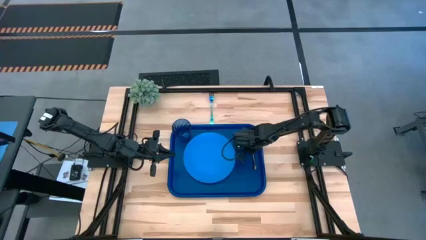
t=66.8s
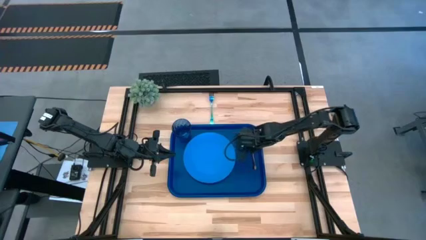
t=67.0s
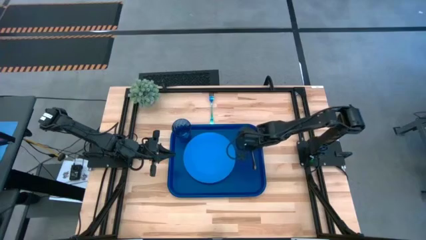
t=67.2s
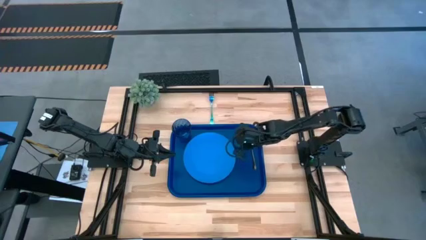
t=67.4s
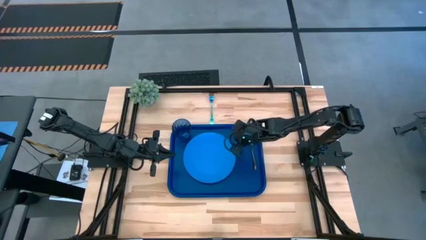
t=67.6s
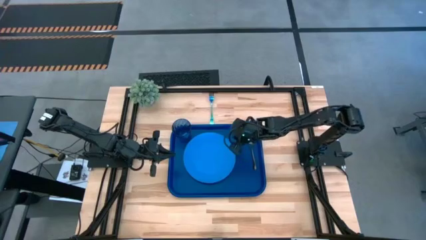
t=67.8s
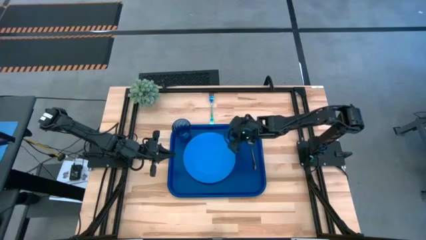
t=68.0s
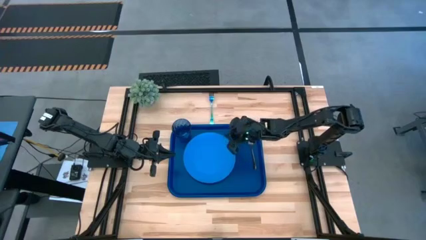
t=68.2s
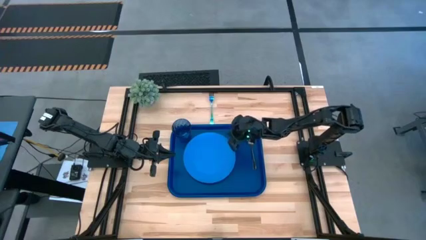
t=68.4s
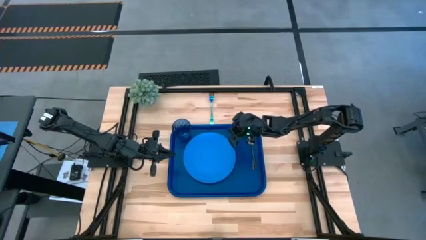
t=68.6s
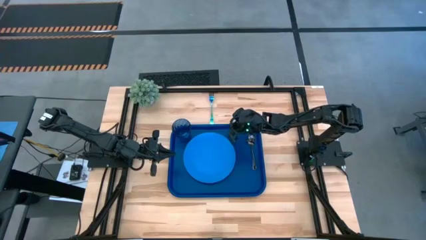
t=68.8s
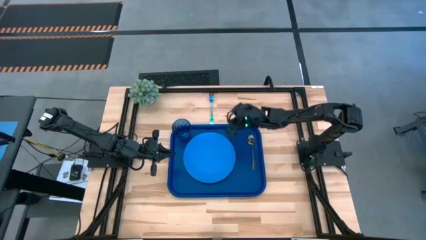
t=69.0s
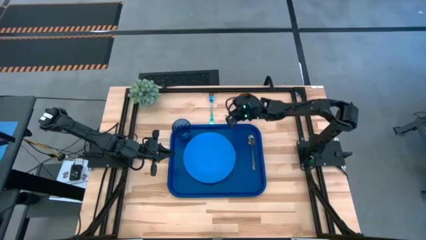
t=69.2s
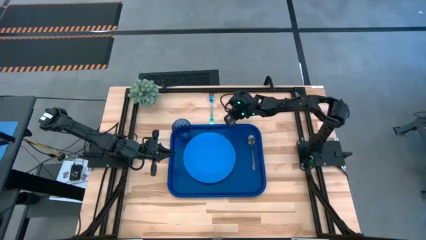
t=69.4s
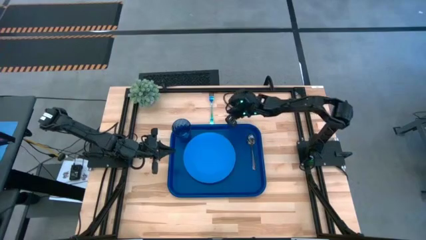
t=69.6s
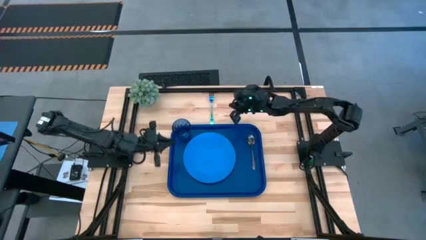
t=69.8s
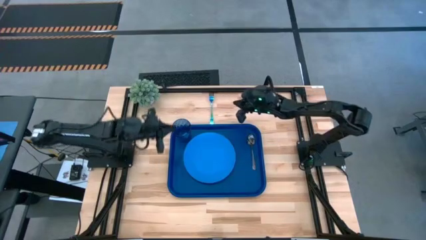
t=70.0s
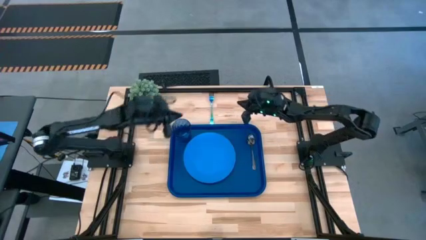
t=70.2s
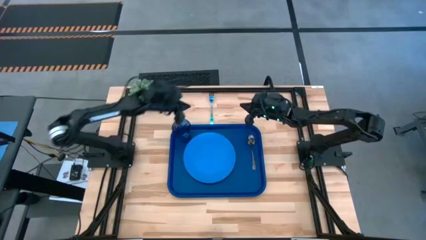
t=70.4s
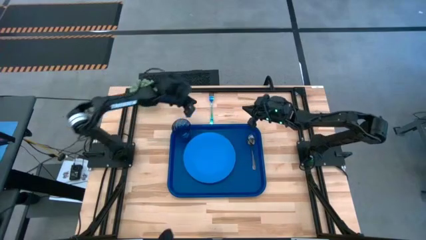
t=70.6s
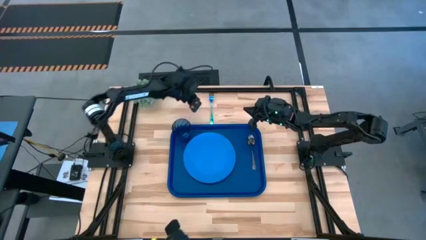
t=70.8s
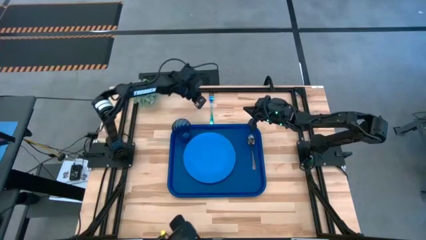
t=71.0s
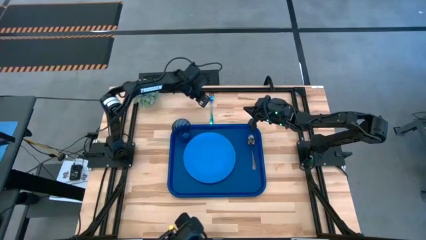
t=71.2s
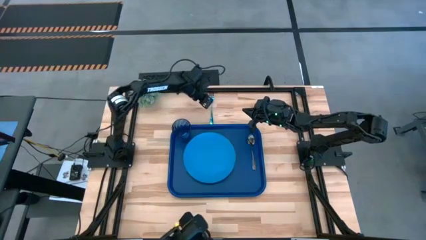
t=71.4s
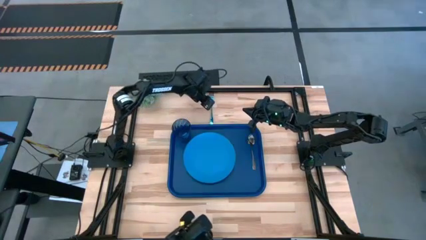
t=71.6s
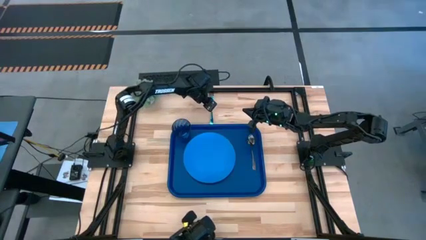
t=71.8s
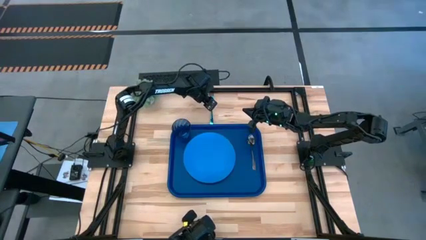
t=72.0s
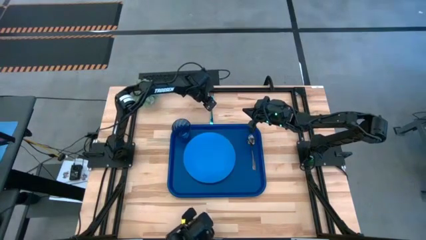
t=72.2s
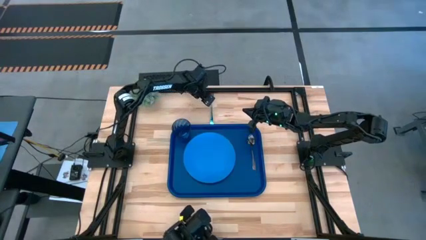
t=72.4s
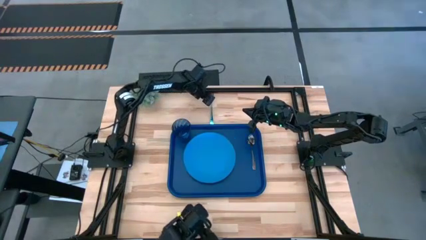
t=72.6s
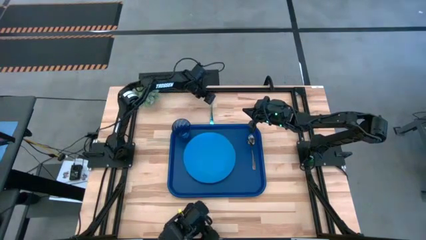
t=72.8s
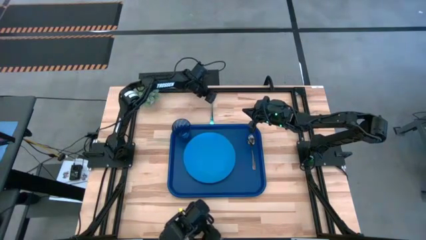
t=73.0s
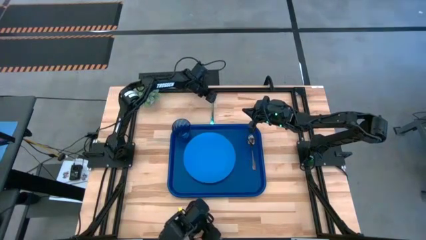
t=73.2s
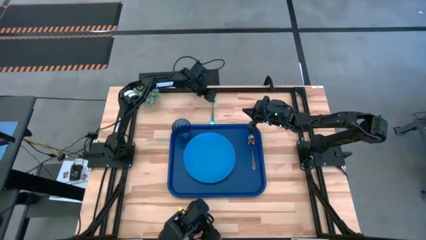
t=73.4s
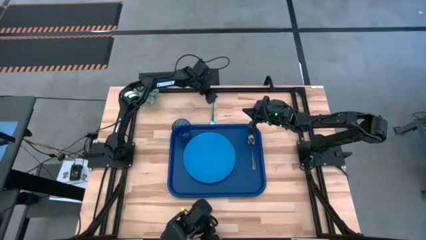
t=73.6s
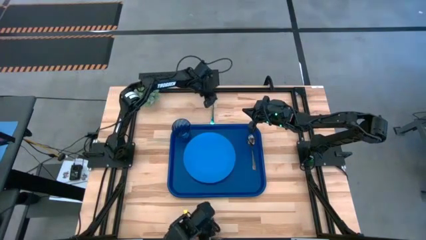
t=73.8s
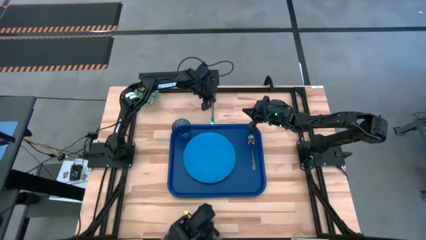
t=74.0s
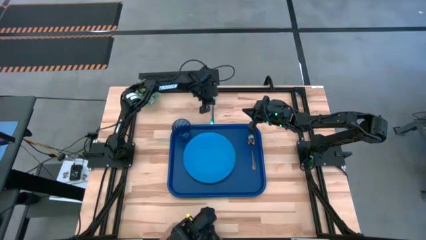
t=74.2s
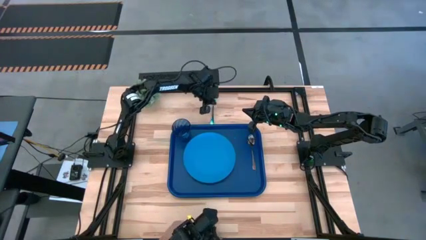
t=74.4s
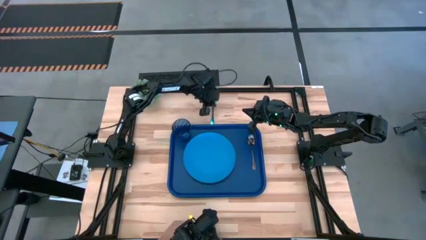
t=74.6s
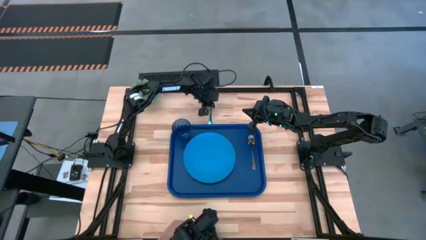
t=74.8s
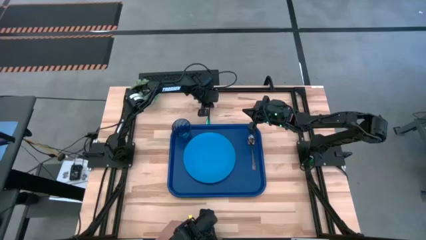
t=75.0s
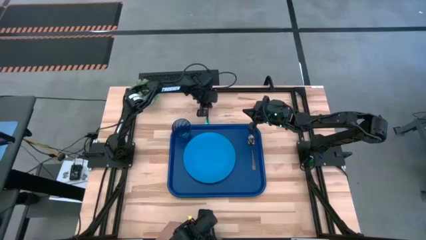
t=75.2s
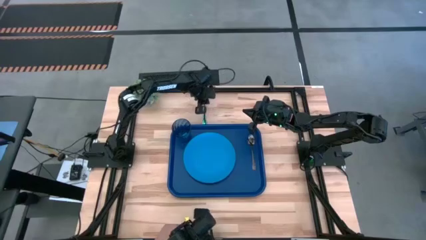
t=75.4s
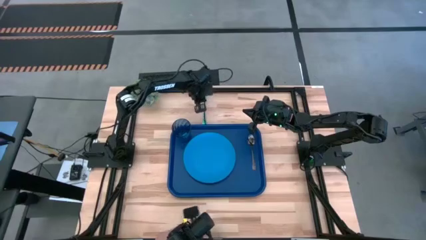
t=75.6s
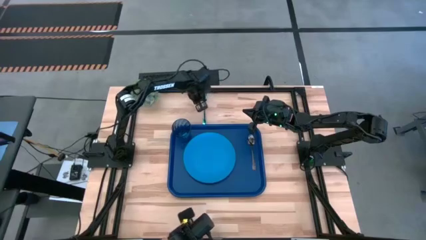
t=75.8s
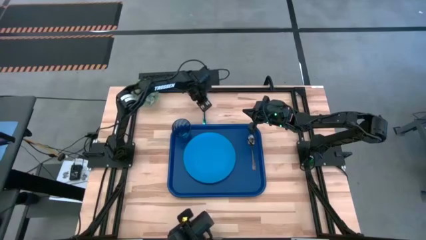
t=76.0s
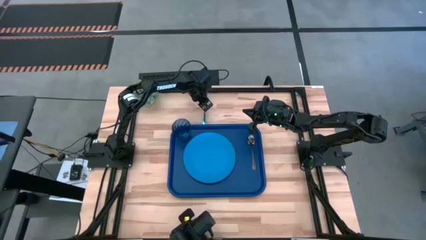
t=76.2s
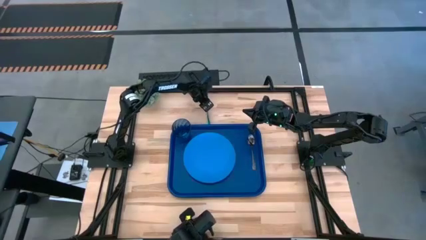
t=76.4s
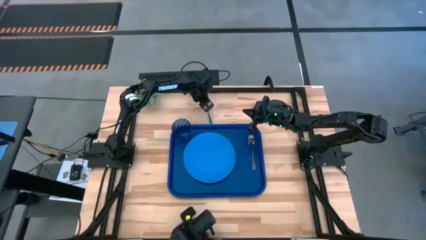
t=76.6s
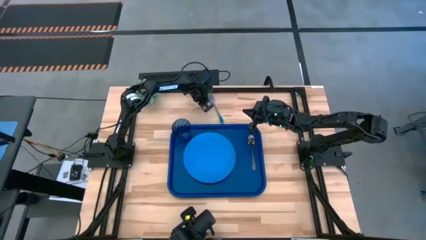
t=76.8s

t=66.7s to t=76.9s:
Task: Pick and place plate/cup/fork/spoon on tray
Put the blue fork on the blue tray to the right of the blue plate

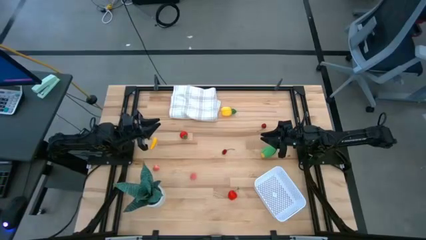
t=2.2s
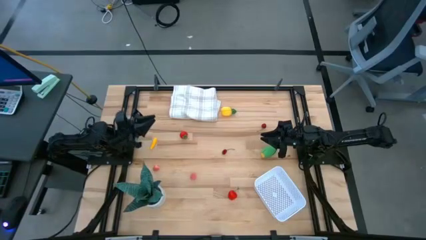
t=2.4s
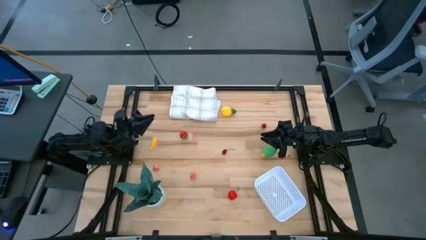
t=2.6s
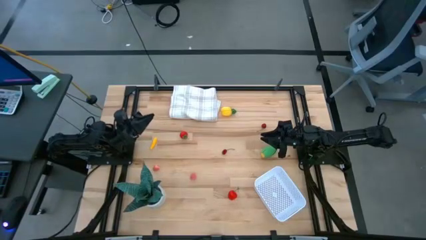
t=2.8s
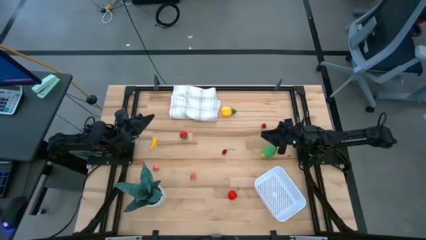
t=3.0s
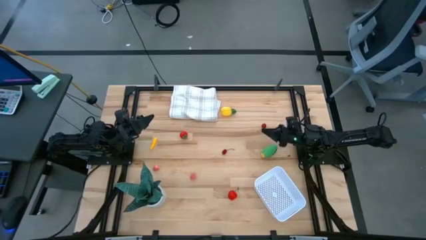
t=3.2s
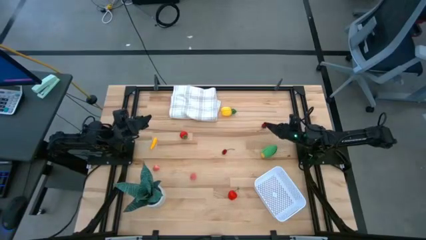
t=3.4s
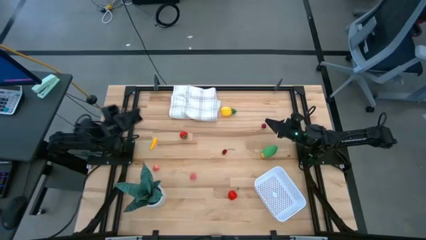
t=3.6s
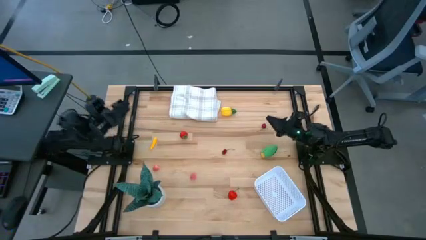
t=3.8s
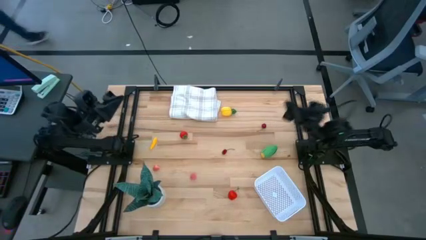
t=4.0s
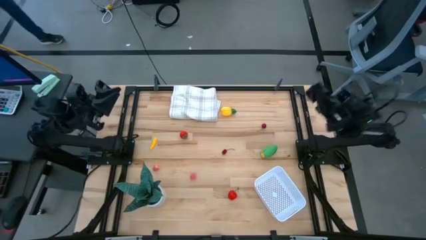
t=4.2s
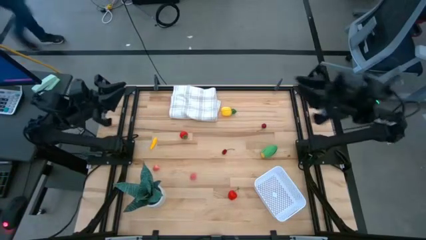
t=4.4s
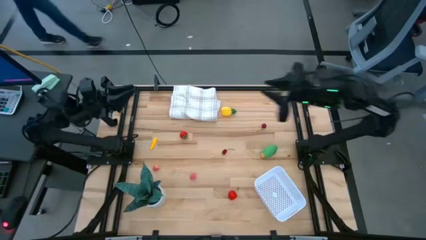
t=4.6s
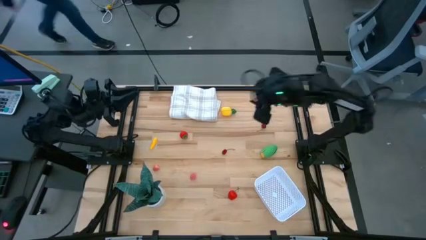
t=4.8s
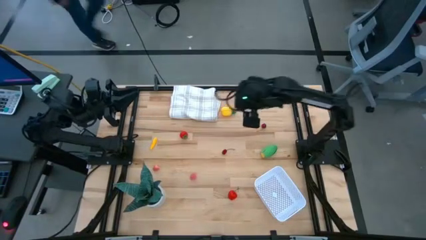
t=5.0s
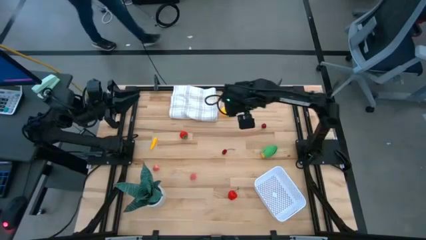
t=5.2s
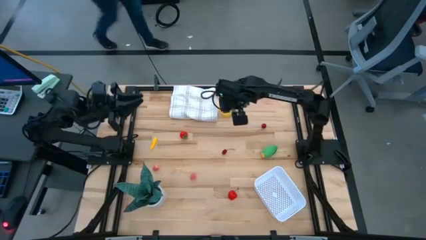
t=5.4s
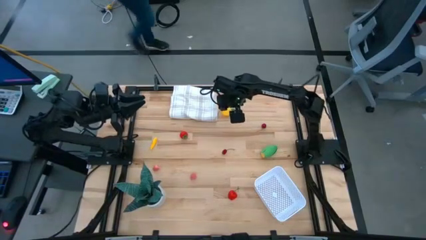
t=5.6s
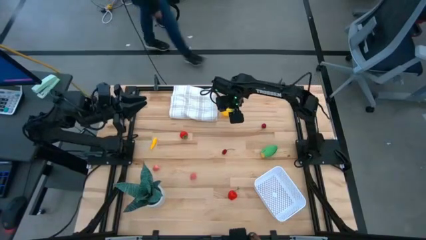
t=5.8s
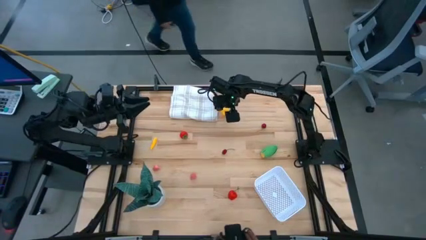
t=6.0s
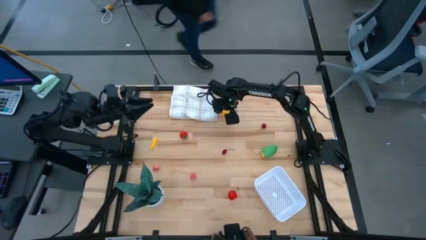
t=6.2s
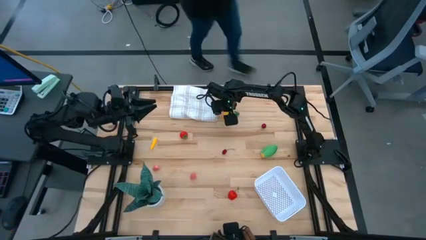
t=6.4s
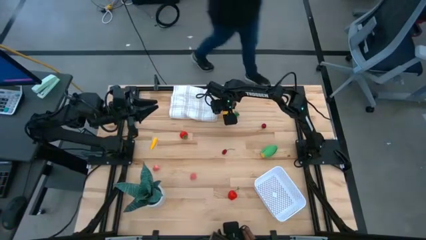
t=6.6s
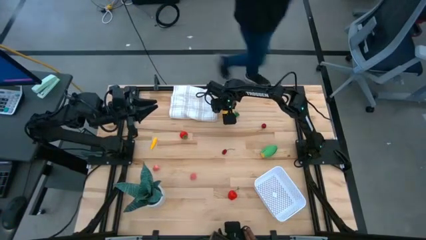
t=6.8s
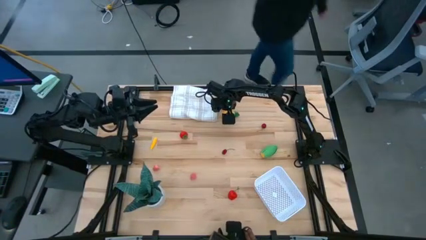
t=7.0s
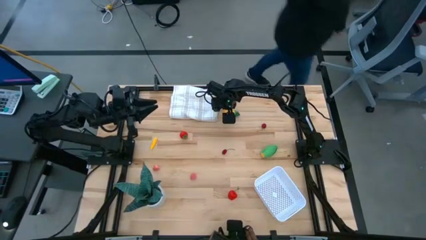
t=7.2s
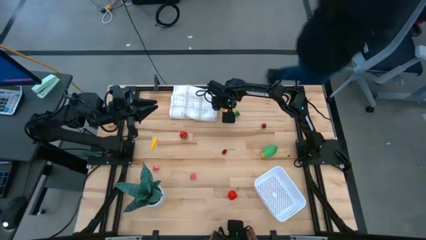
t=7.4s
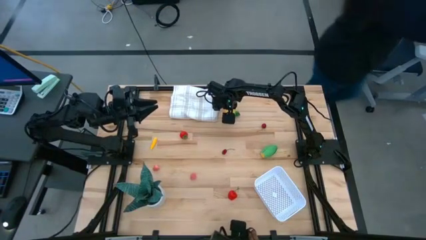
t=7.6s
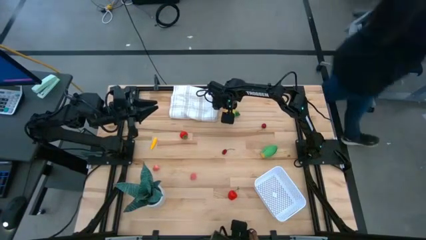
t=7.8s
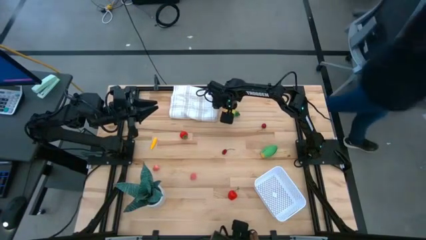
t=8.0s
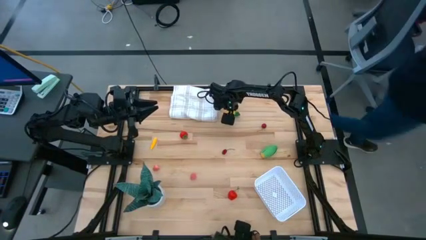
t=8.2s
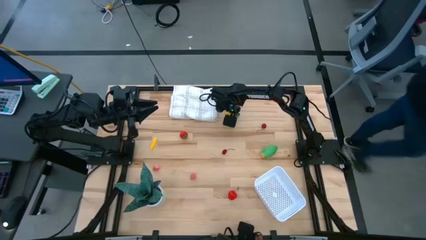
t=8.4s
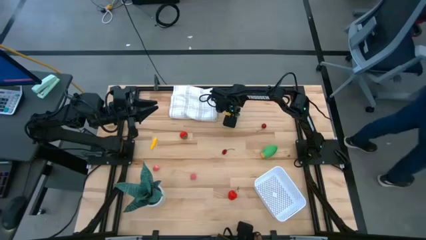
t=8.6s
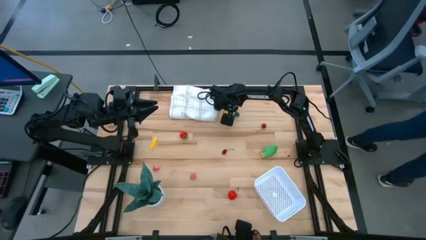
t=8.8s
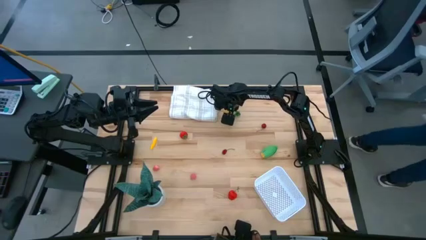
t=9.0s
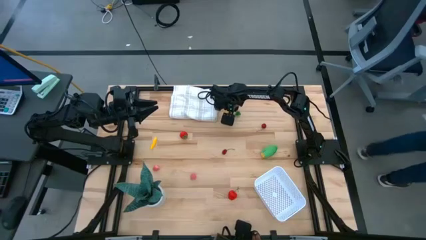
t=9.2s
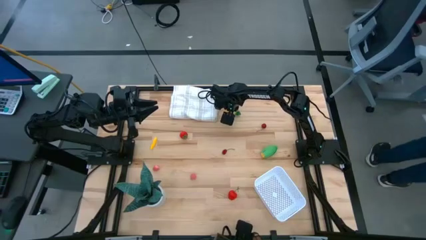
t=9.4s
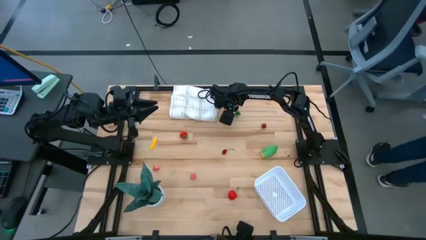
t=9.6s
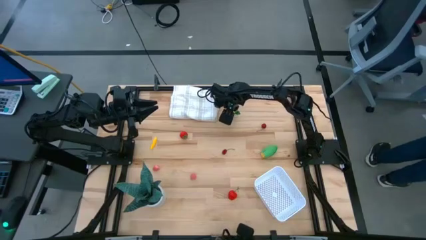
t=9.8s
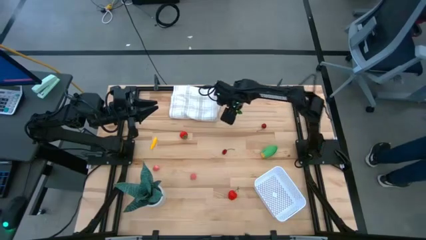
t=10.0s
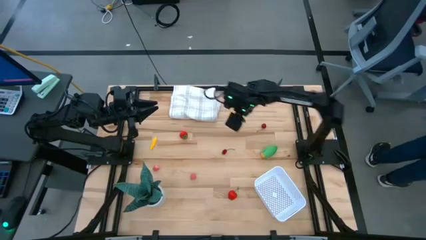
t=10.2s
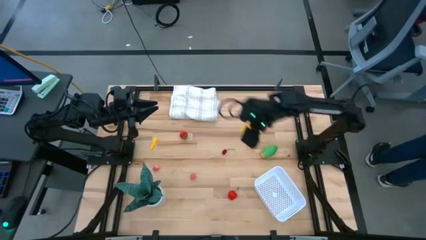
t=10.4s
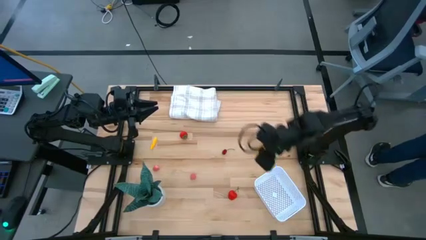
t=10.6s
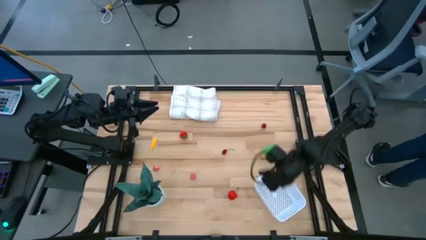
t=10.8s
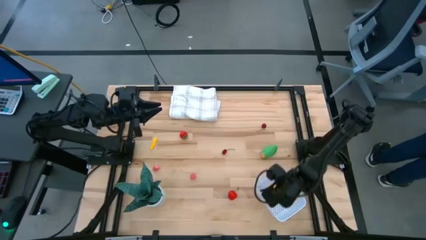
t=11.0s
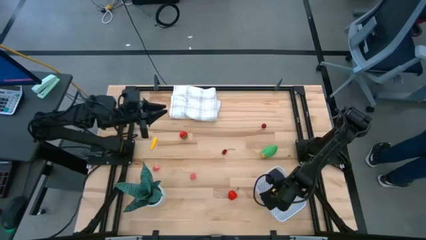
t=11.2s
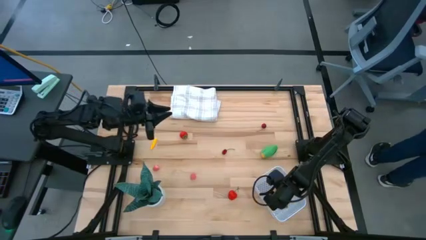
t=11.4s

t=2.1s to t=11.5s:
Task: Pick and placing Produce into tupperware
Put the pineapple into the white bin
